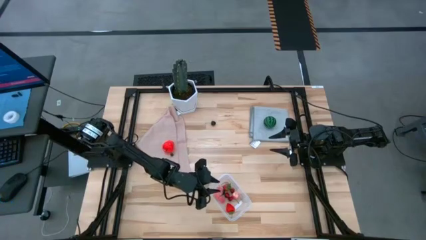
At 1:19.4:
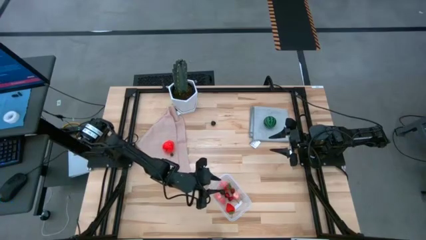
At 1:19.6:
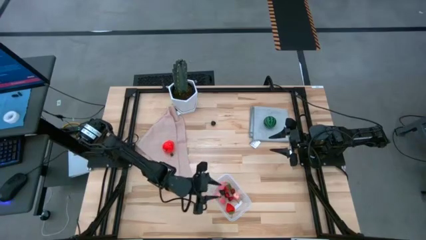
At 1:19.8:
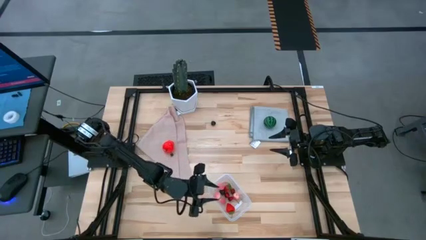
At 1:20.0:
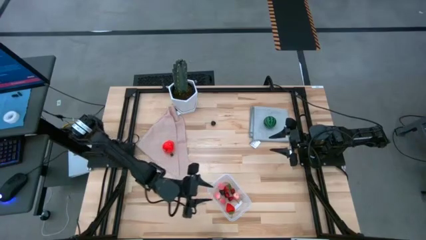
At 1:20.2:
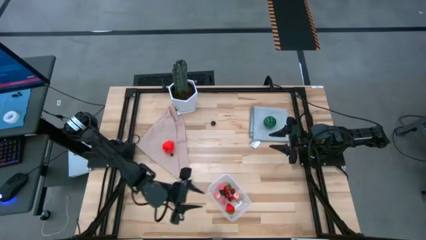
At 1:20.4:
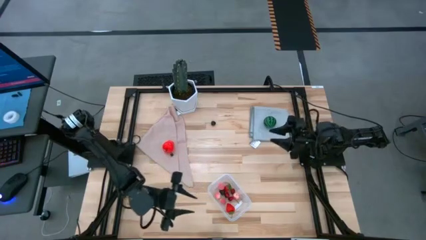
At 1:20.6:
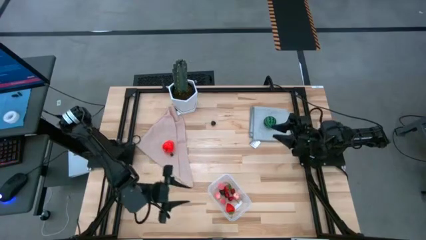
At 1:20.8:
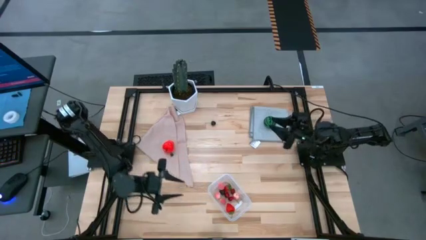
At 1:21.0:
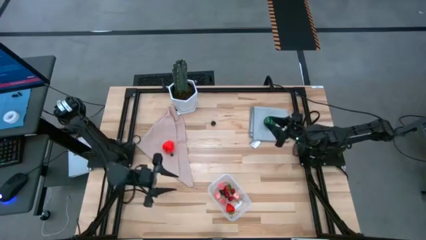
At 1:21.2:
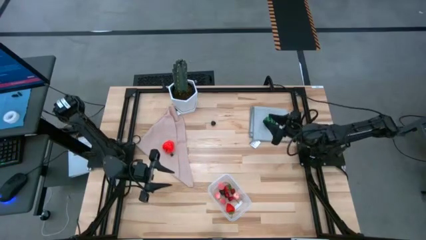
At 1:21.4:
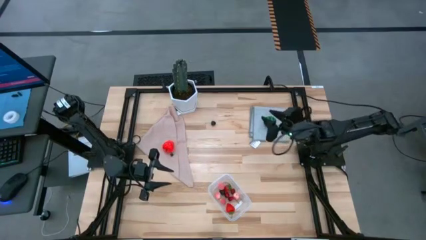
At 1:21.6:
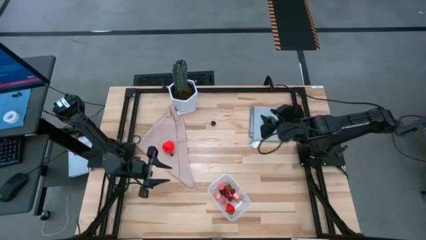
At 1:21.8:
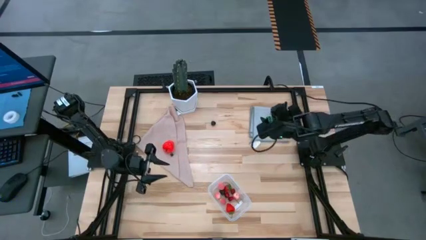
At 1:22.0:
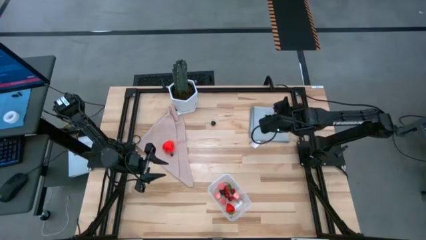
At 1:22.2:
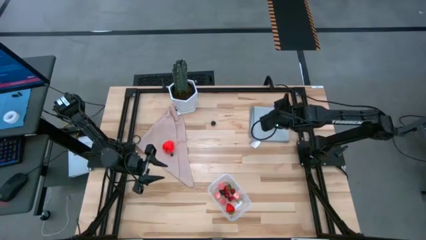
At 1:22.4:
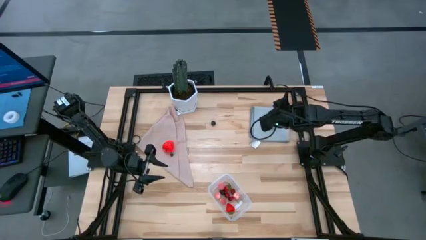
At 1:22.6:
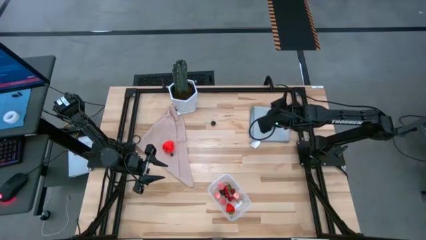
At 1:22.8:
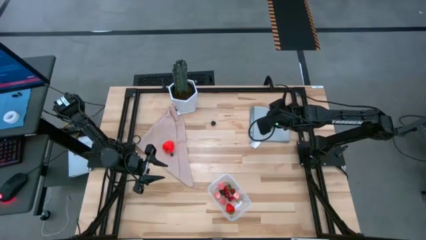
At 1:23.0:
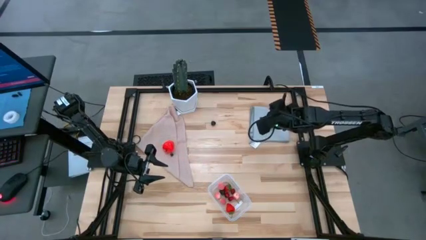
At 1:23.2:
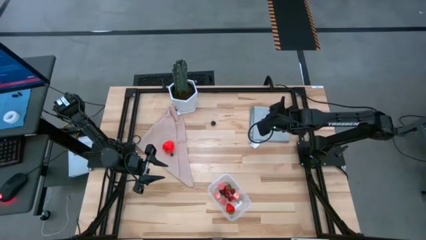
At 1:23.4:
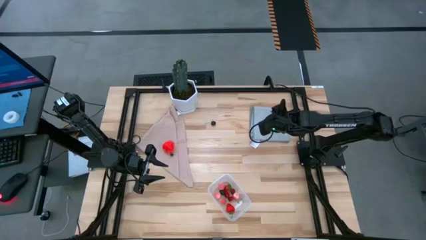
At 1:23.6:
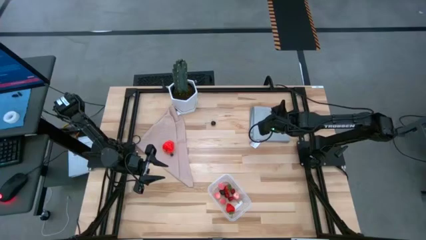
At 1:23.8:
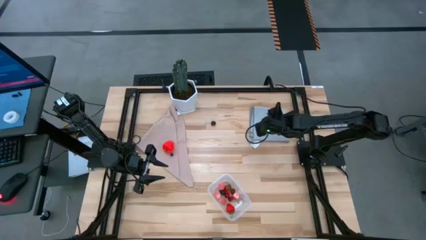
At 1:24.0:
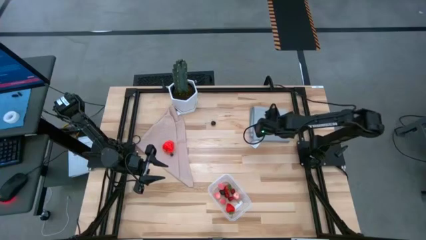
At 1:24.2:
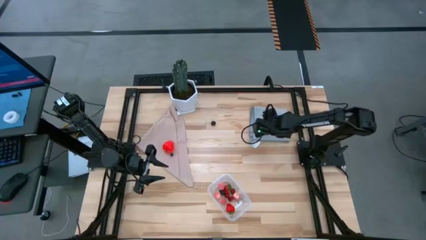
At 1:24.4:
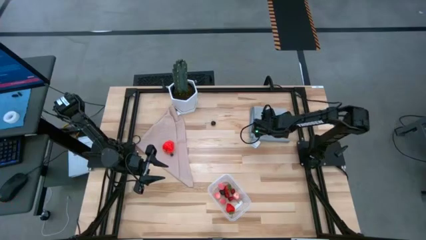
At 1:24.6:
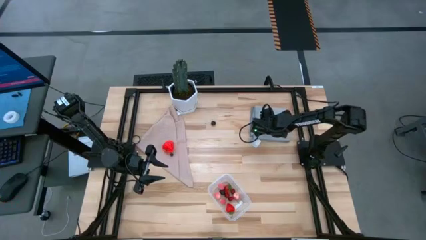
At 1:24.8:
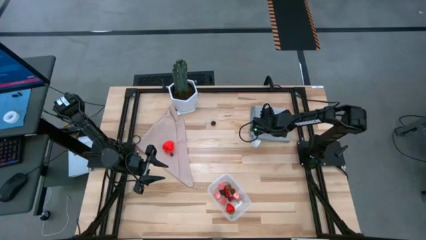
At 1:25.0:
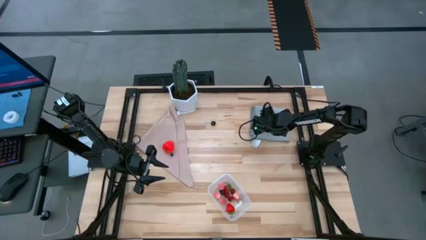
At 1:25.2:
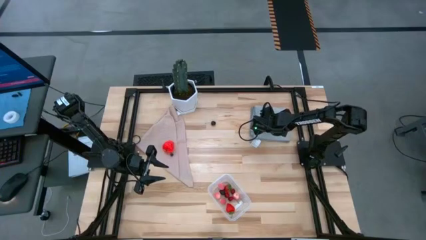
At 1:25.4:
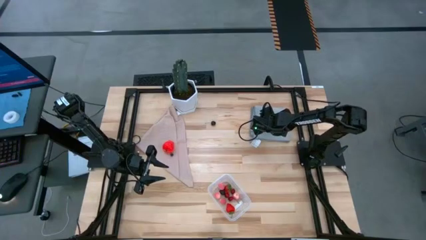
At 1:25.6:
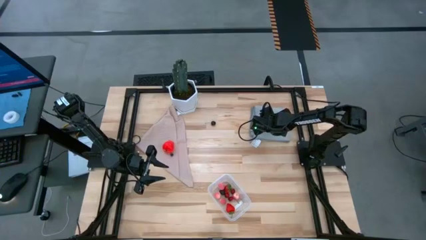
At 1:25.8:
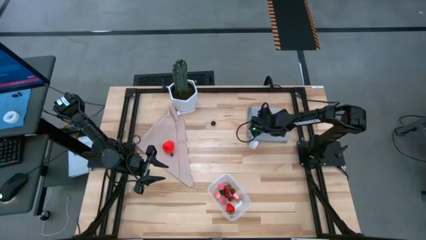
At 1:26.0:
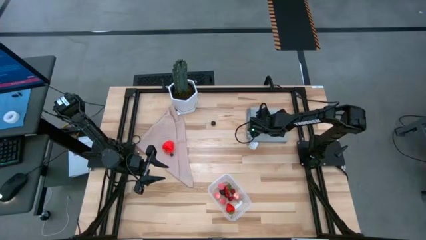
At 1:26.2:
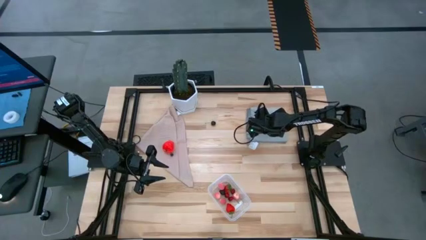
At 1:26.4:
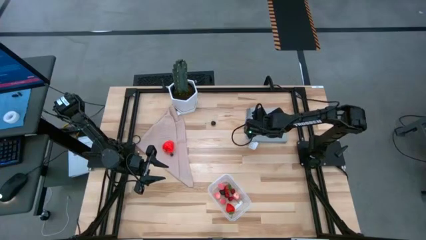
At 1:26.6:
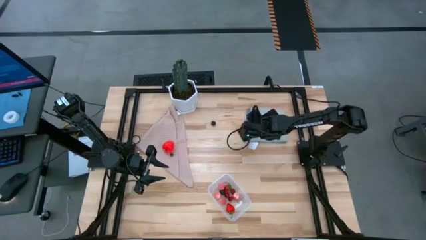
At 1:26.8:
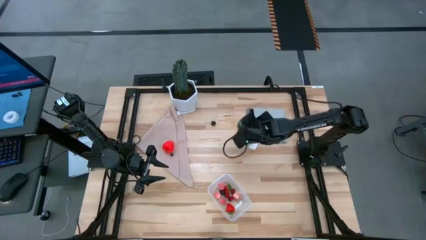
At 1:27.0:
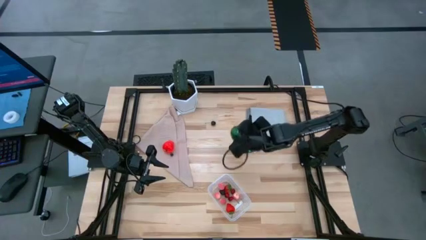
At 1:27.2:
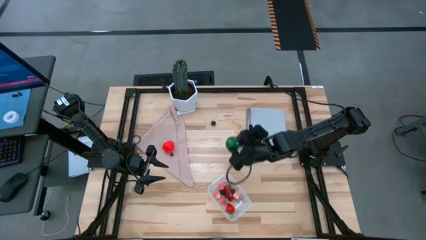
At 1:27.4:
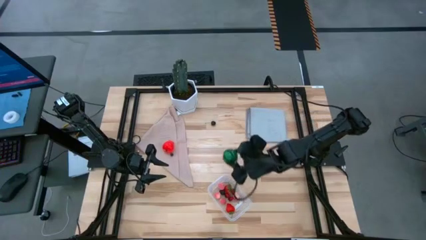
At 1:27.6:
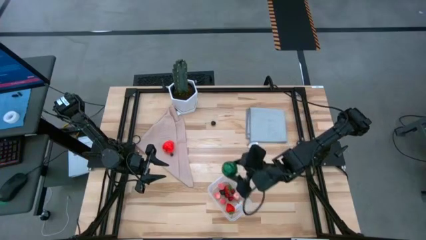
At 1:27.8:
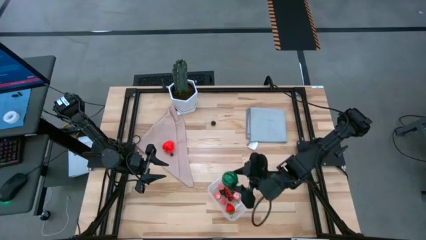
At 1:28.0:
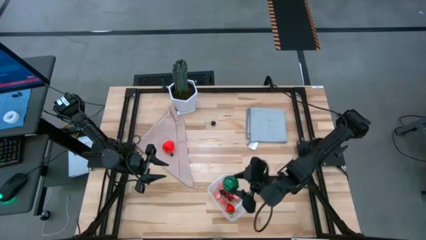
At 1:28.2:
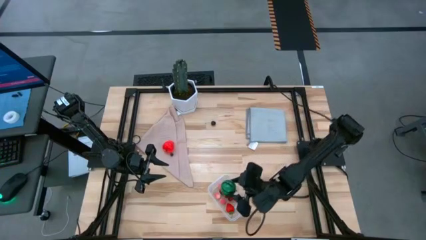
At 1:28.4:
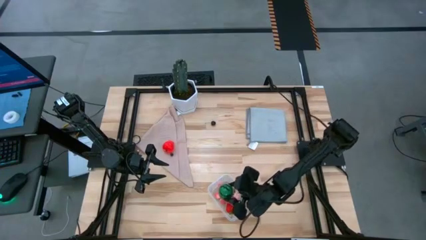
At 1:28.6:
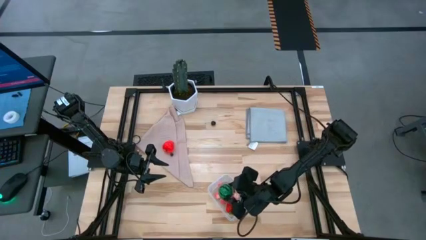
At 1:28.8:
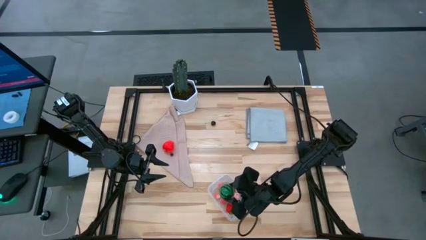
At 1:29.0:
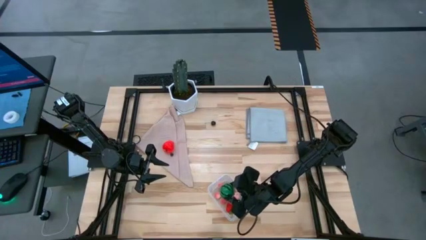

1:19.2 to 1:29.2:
Task: Pick and placing Produce into tupperware
Put the watermelon into the transparent bin
